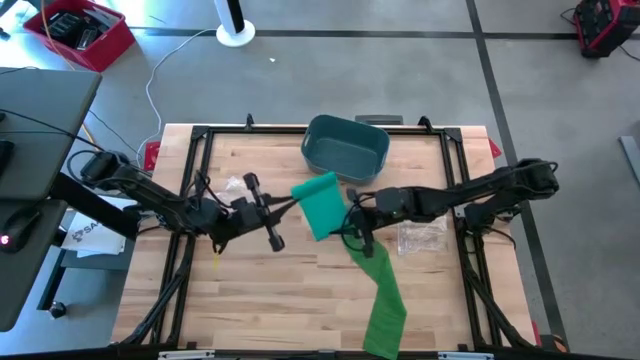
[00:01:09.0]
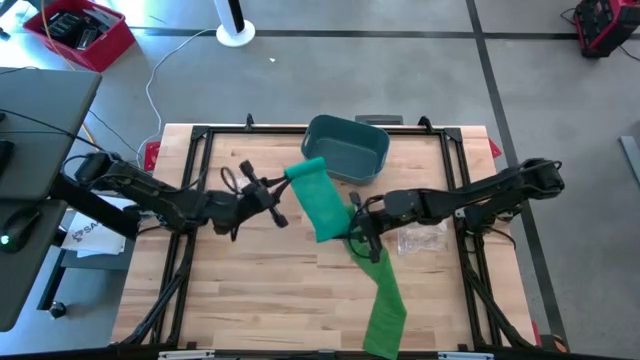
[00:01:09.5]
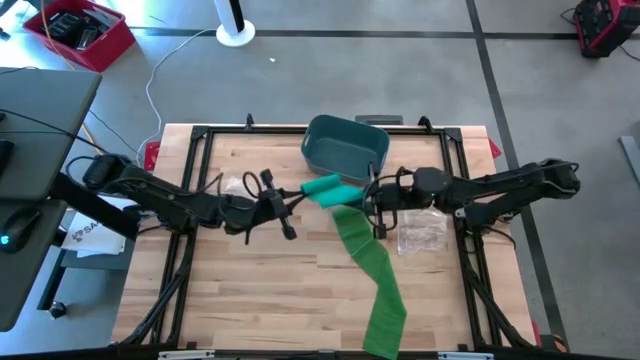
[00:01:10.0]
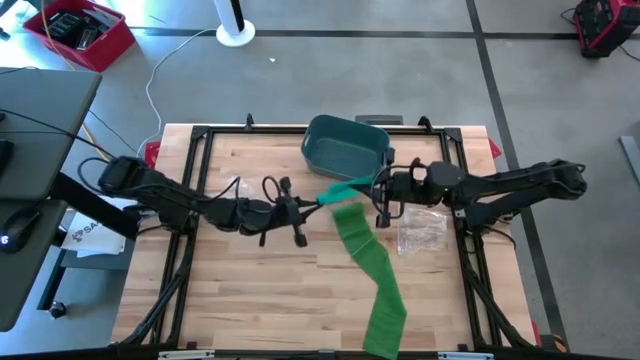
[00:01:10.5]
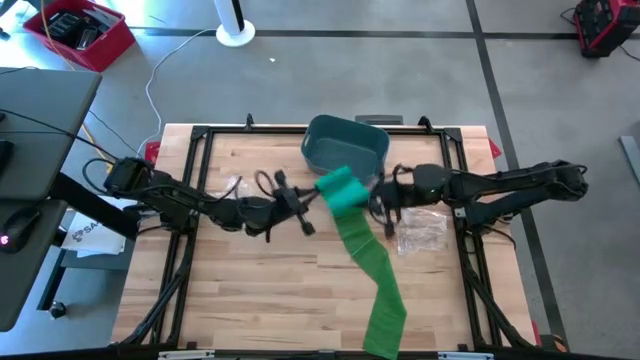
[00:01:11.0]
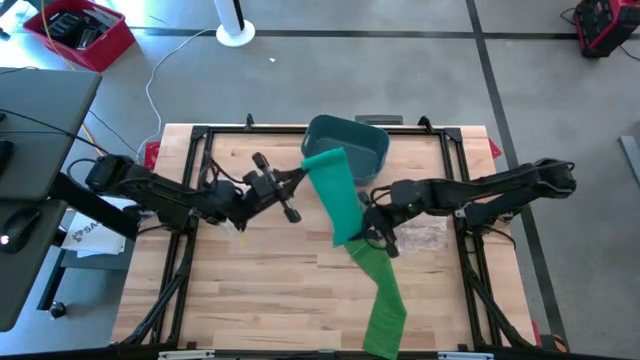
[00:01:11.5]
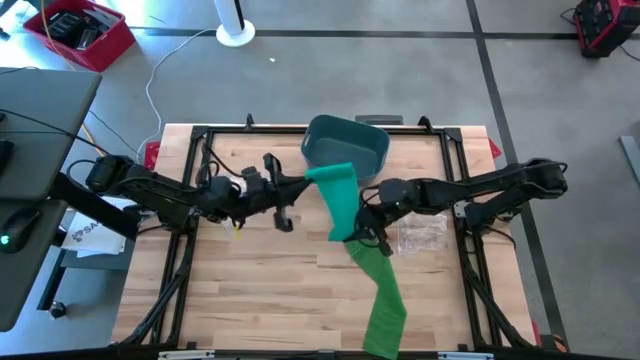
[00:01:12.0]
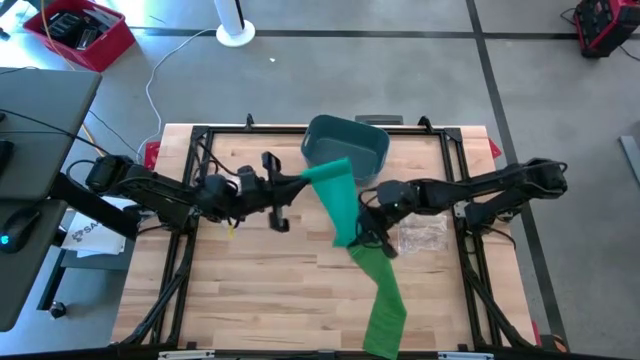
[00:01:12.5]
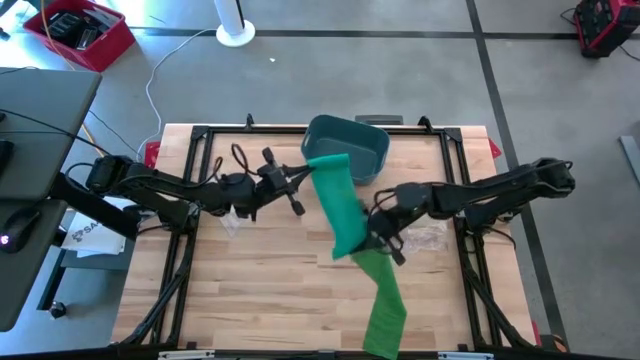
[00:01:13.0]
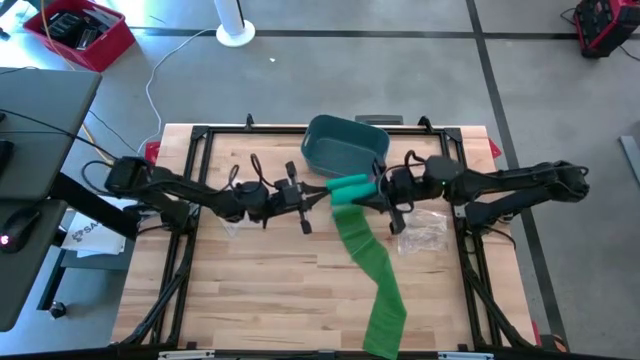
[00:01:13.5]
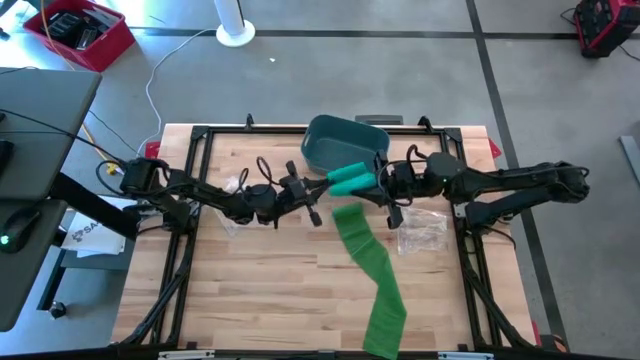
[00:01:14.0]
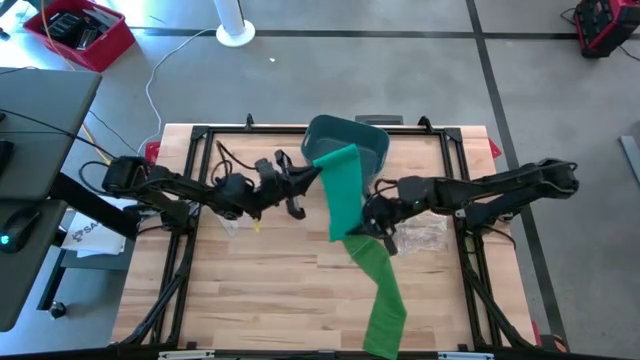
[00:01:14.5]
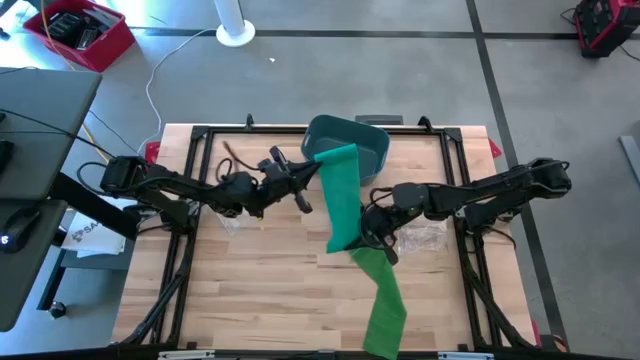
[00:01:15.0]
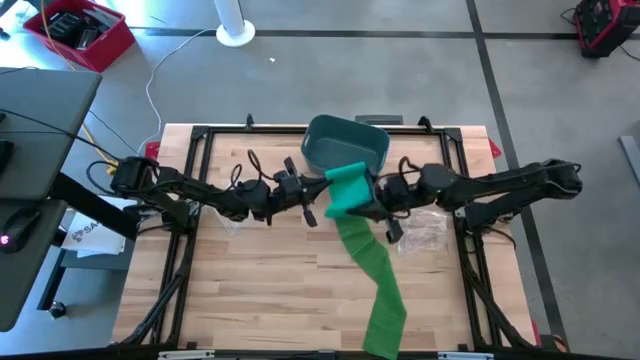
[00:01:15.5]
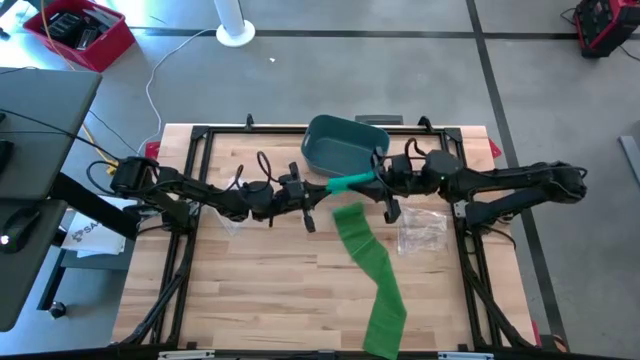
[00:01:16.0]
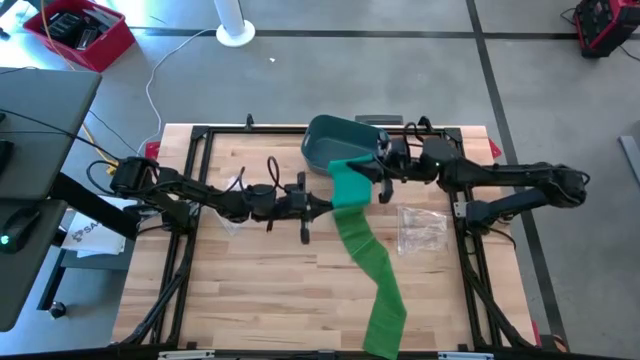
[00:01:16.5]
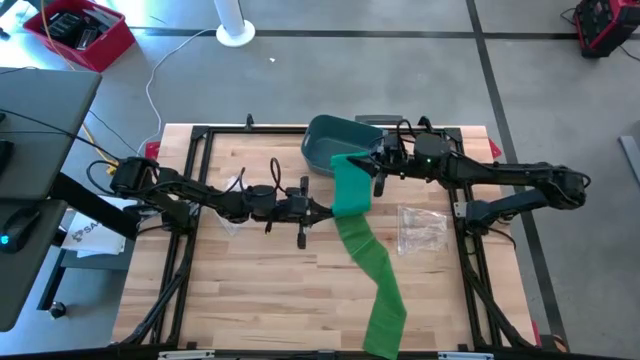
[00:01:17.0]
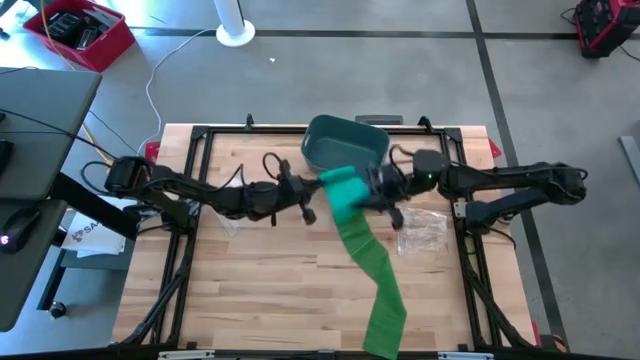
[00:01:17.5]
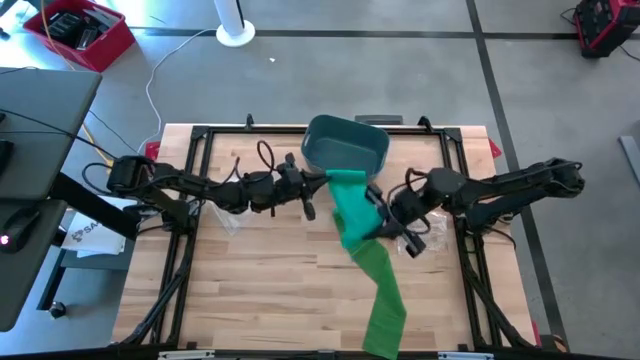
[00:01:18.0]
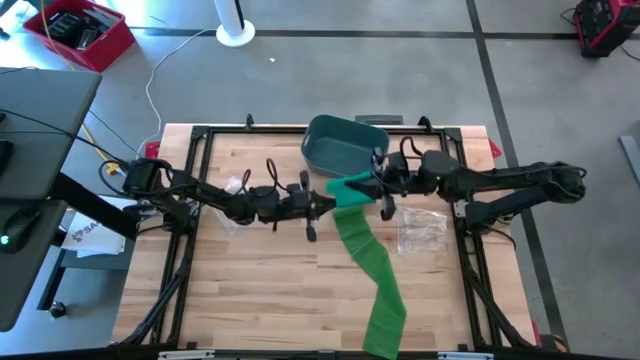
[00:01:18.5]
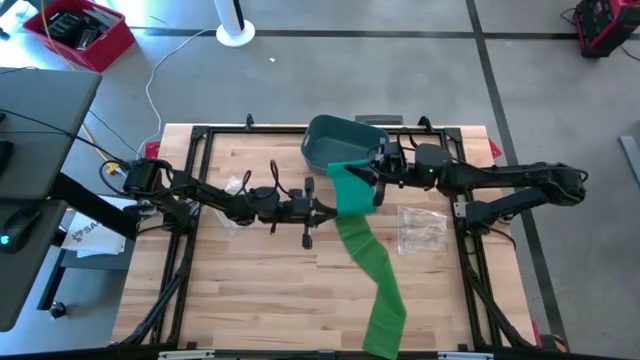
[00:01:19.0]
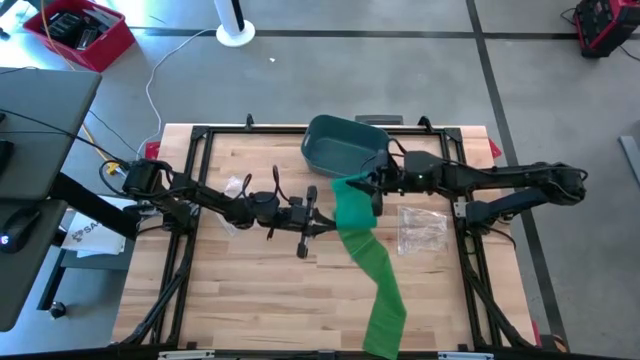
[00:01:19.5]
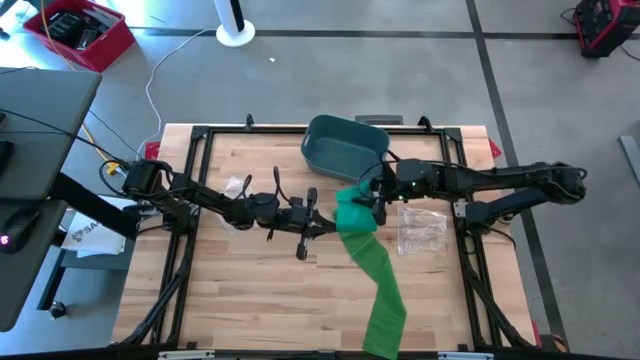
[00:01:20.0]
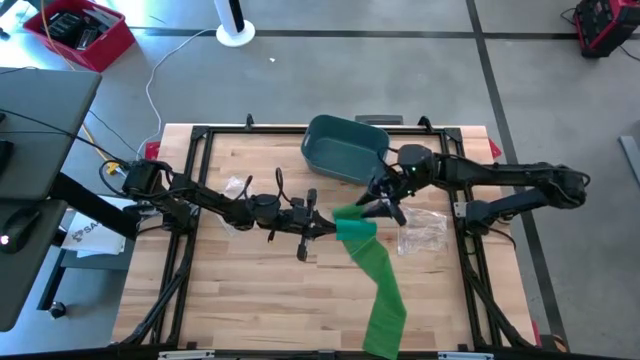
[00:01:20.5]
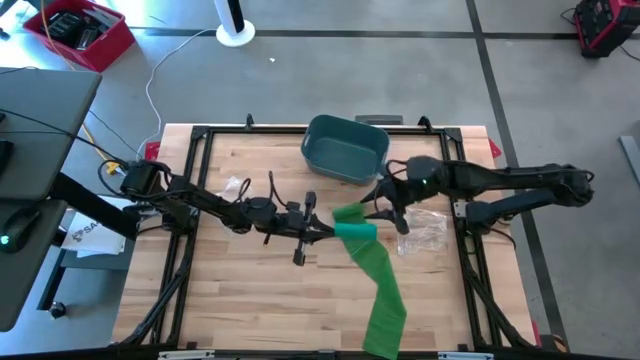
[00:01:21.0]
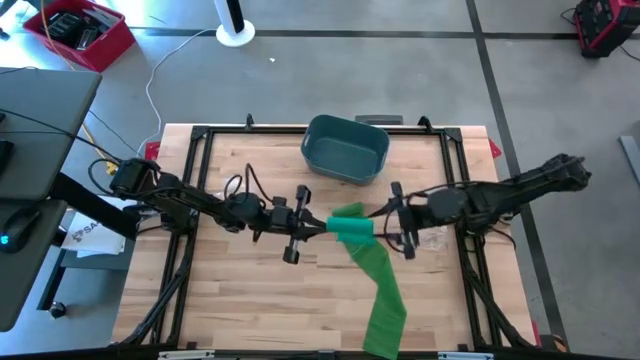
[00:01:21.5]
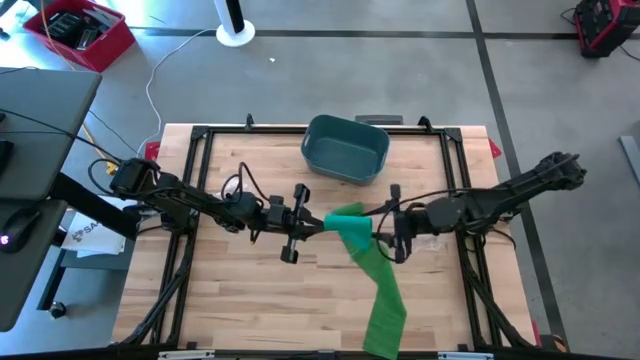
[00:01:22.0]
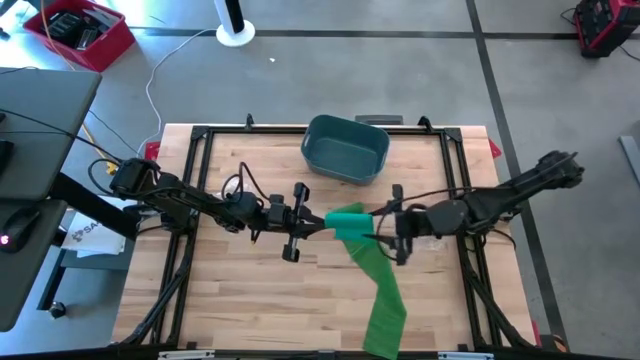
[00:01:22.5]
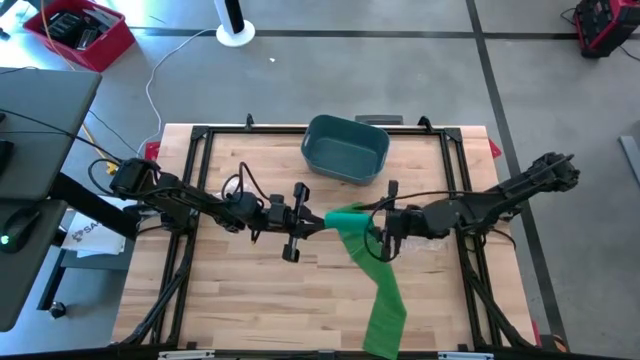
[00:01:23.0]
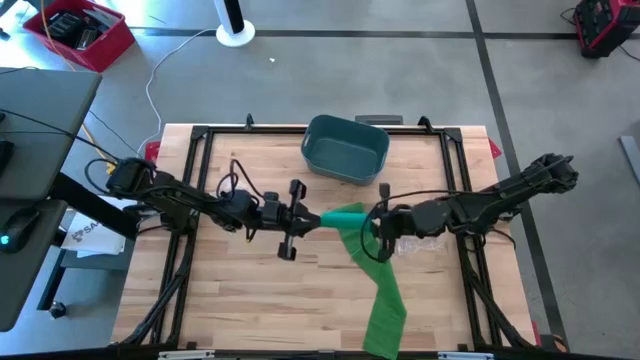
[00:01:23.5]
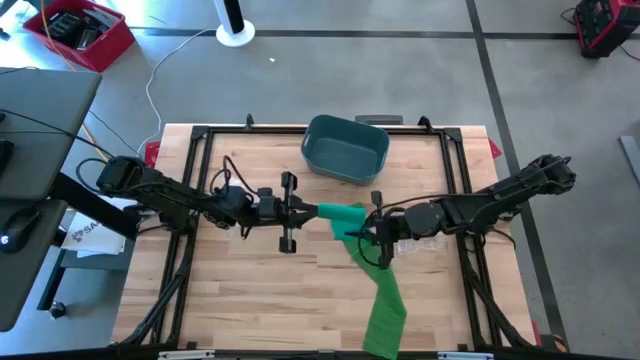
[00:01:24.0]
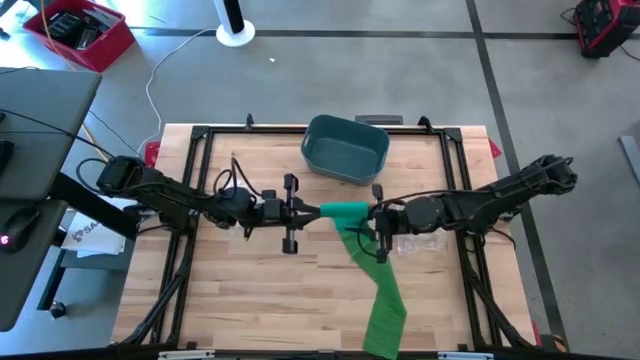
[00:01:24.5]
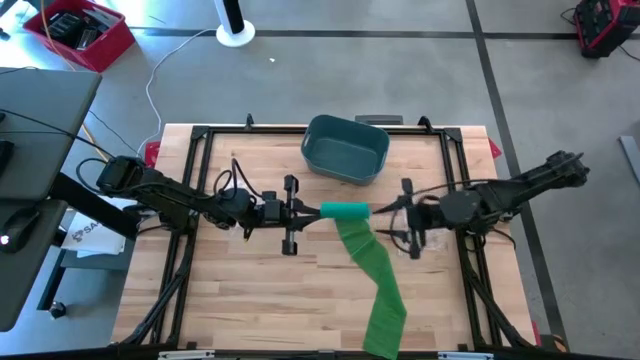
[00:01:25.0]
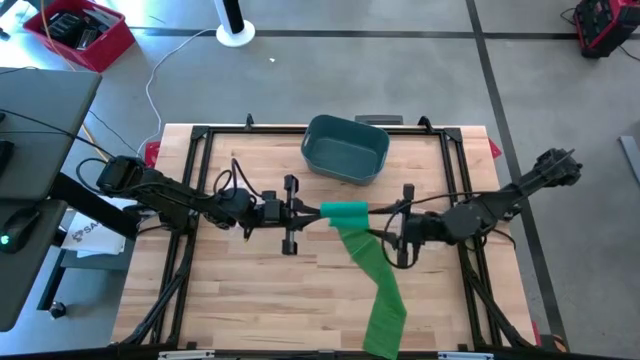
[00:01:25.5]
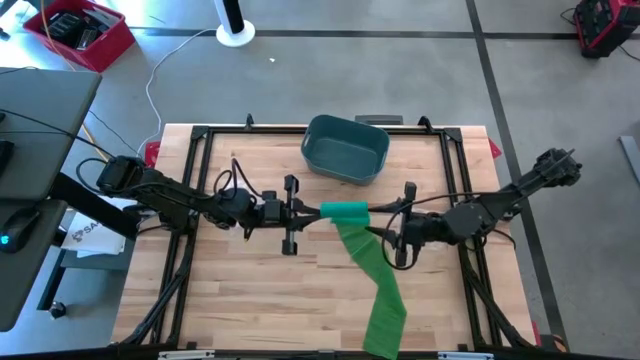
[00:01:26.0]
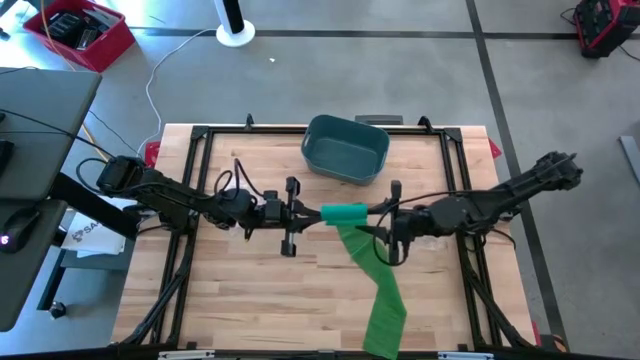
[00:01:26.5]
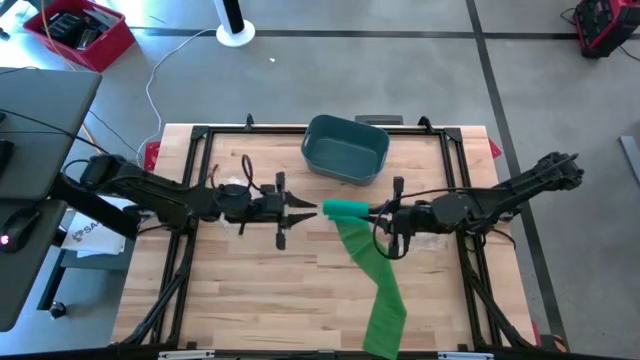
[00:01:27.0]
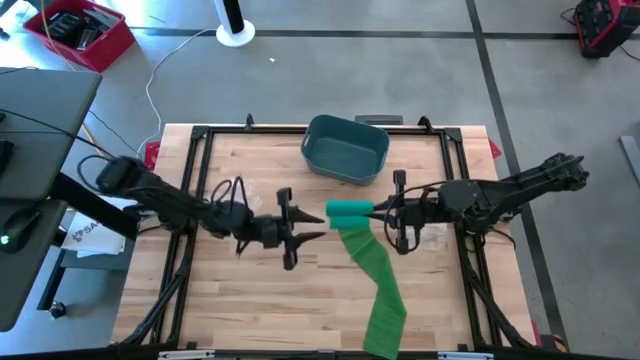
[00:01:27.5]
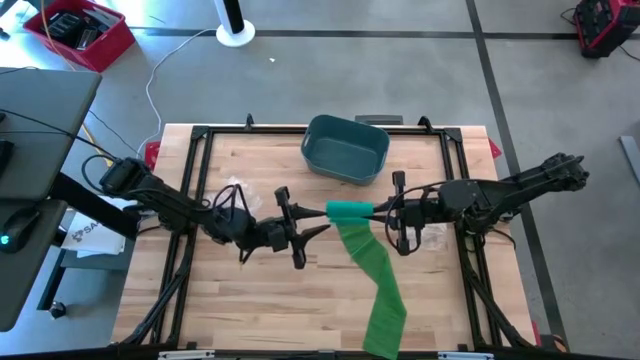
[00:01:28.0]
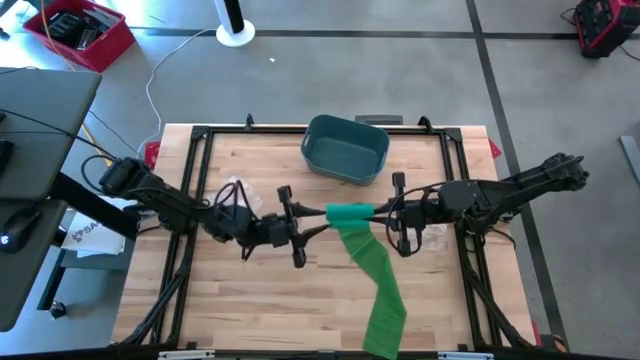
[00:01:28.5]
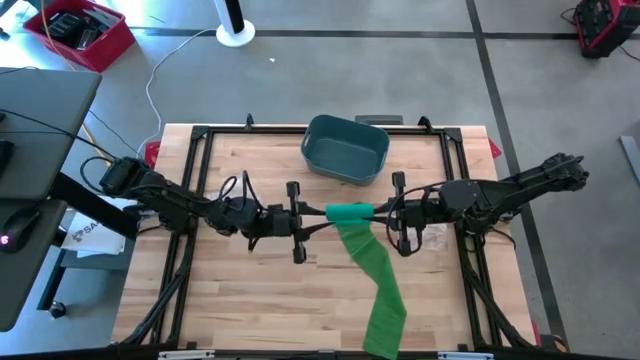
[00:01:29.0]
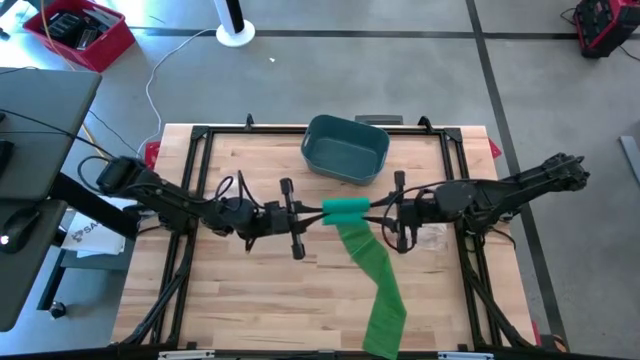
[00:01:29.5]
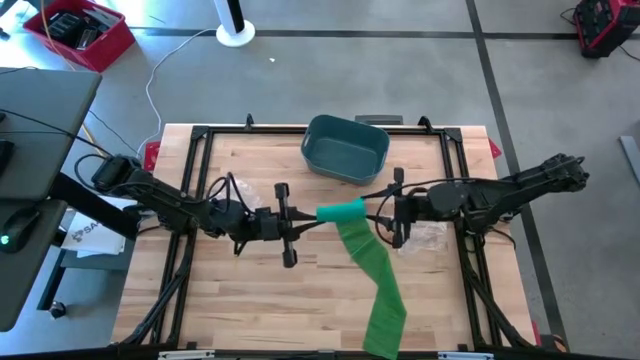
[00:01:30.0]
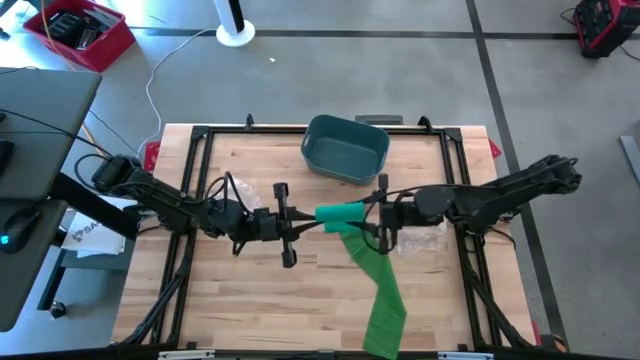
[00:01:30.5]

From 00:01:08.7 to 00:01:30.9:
Task: Roll bandage
Roll the light green bandage
